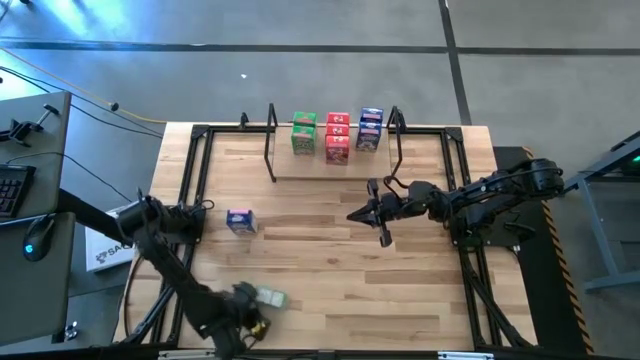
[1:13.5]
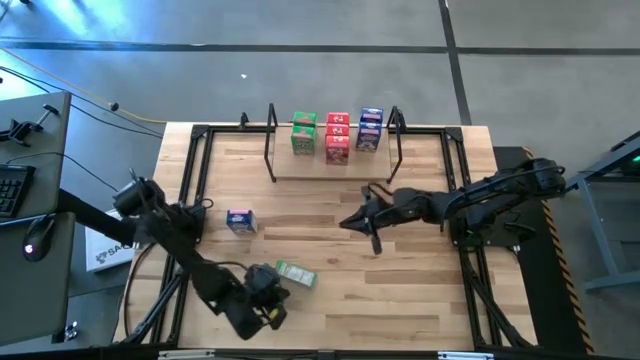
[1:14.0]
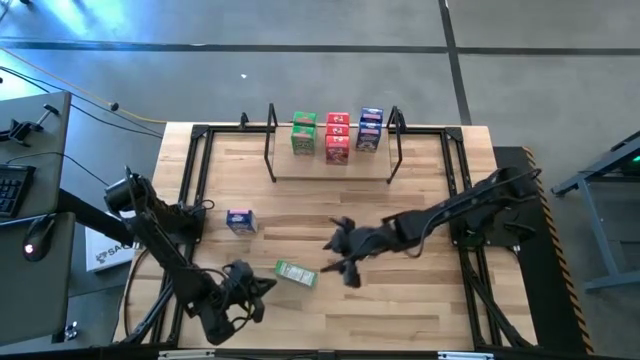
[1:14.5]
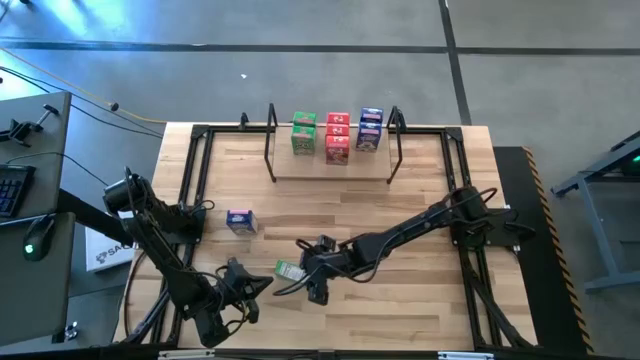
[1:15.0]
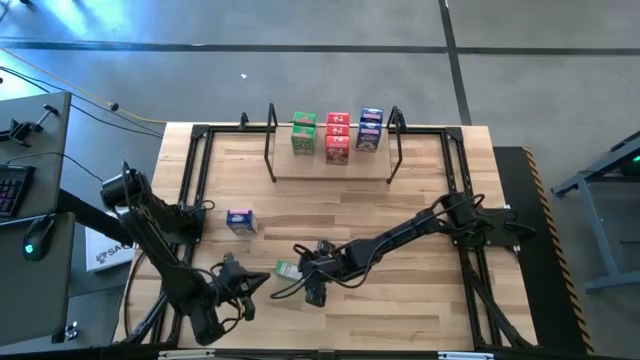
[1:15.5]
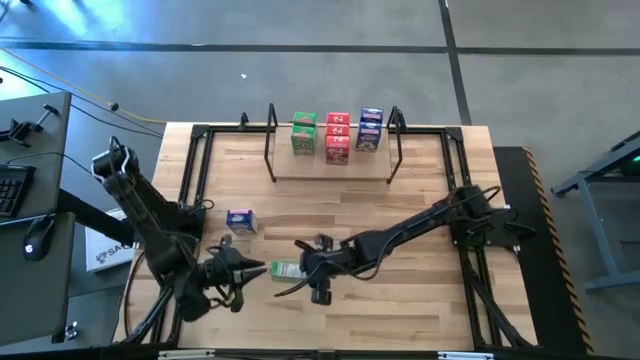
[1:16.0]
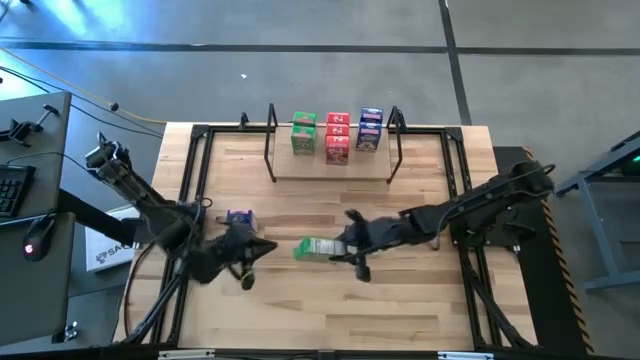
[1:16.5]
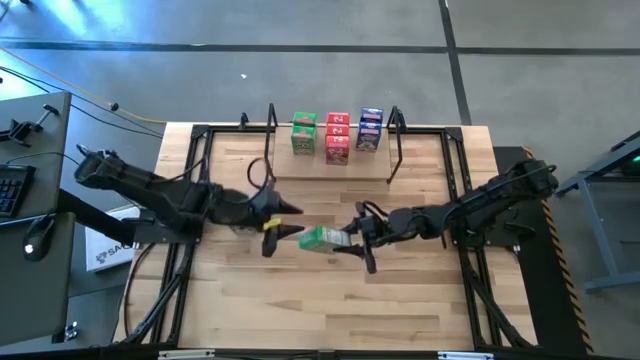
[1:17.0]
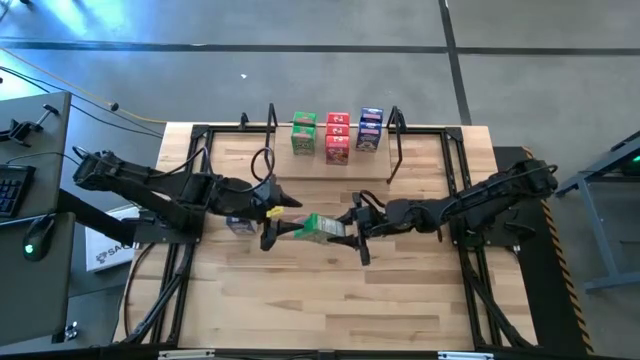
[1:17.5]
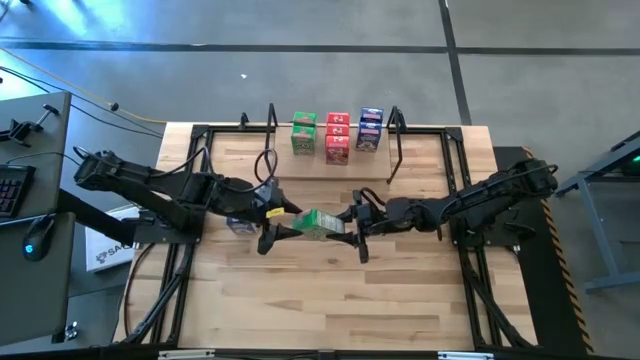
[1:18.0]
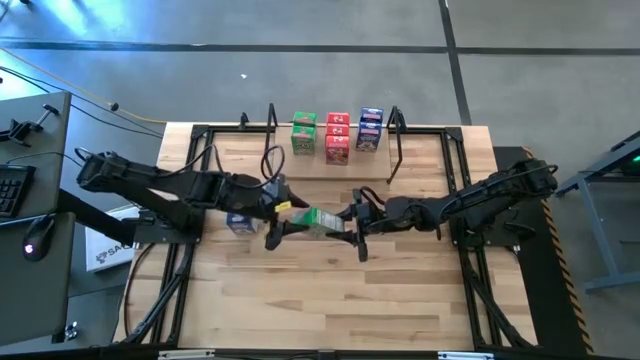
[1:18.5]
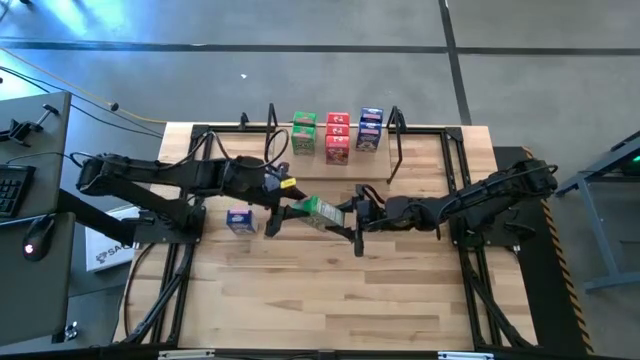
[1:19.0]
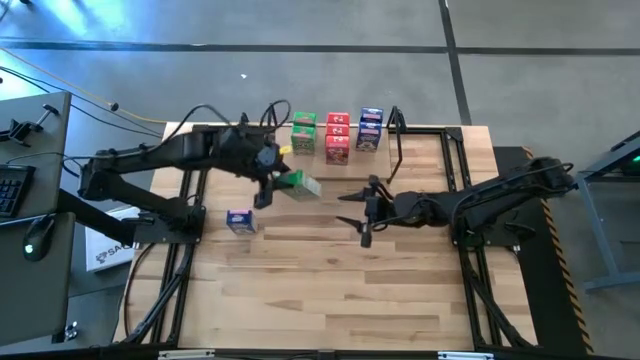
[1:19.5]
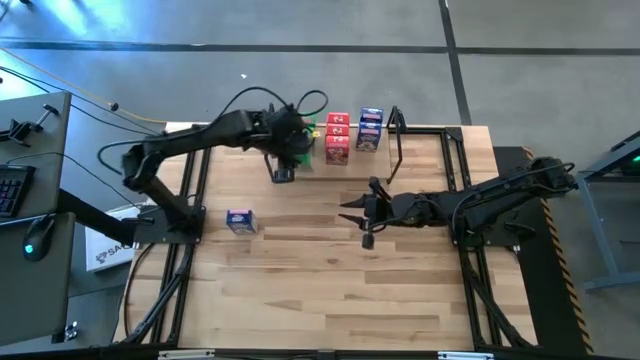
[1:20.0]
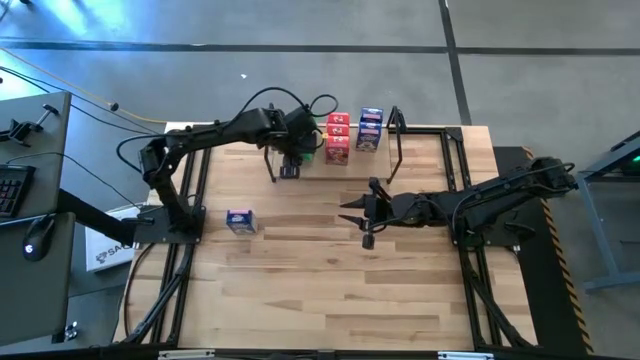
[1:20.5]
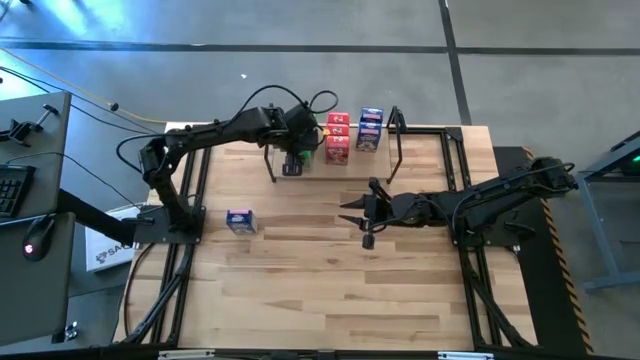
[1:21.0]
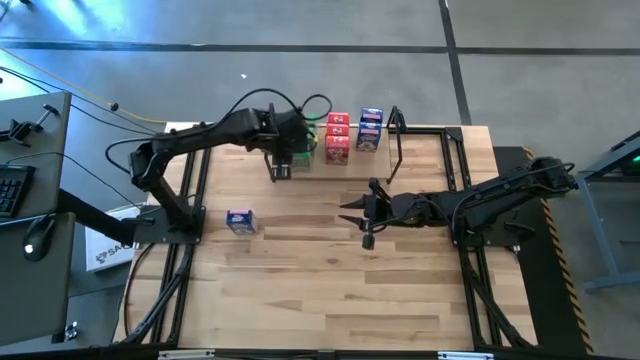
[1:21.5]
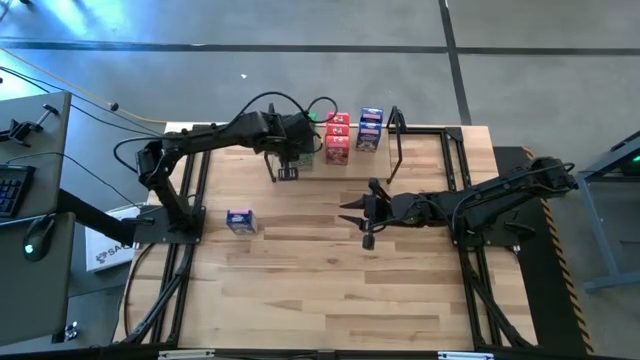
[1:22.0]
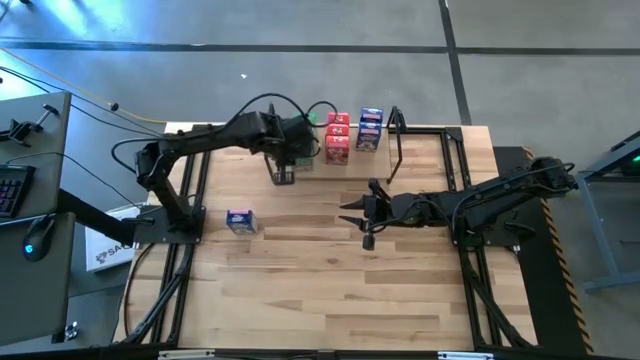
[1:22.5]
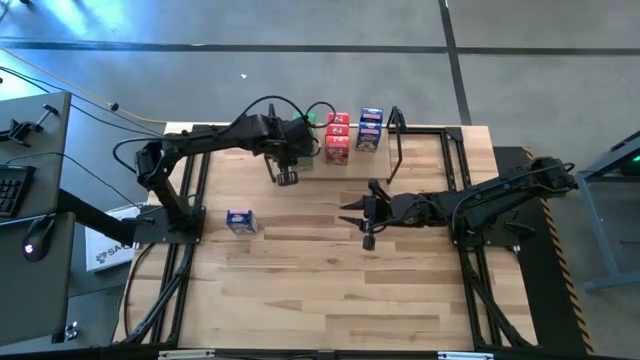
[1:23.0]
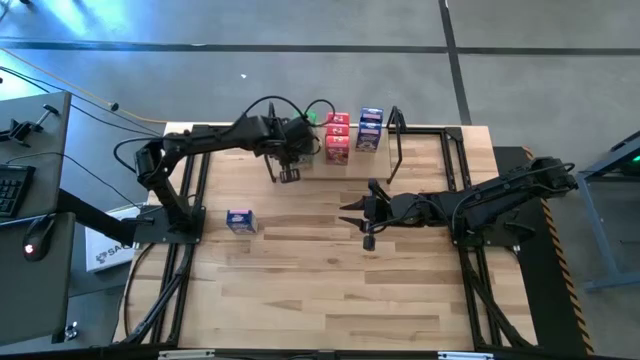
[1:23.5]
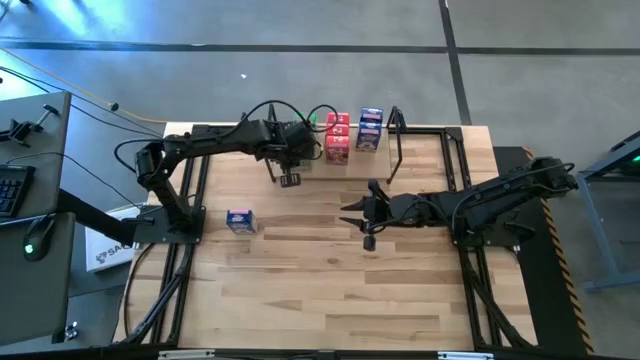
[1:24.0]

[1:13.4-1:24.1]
Task: Stack cereal on shelf
Put the green cereal box on the shelf aligned with the other green cereal boxes

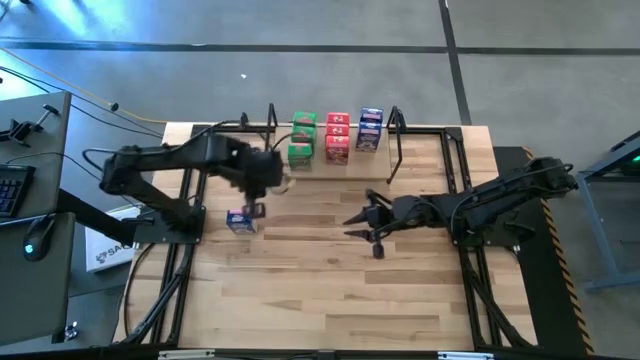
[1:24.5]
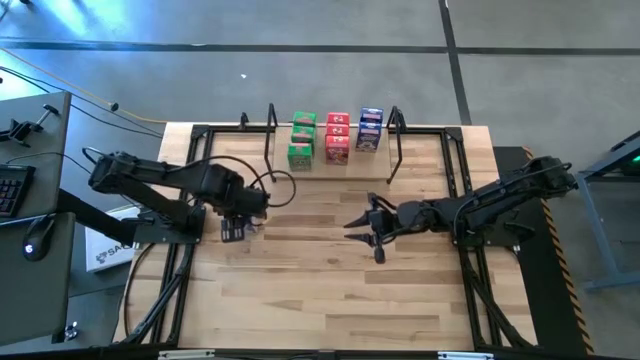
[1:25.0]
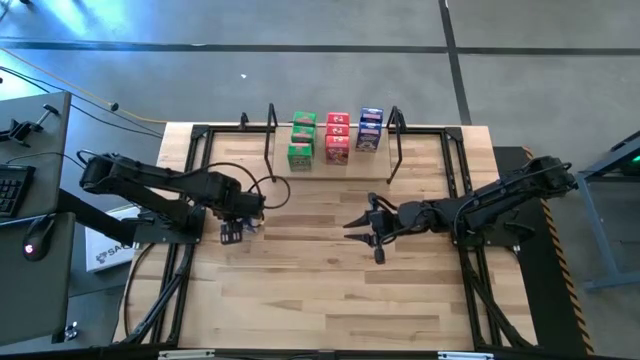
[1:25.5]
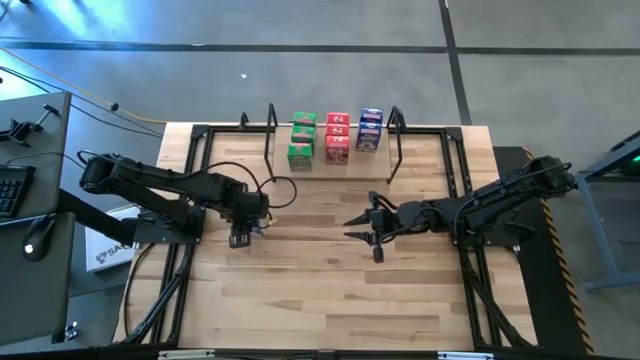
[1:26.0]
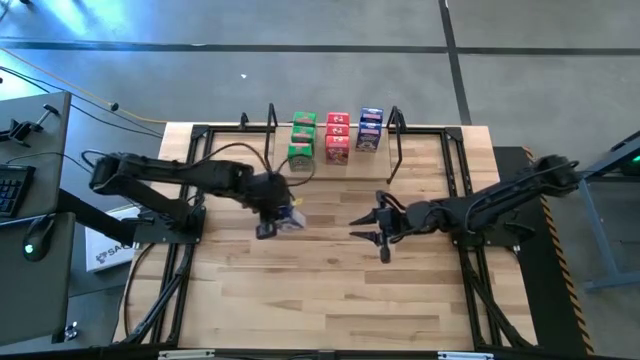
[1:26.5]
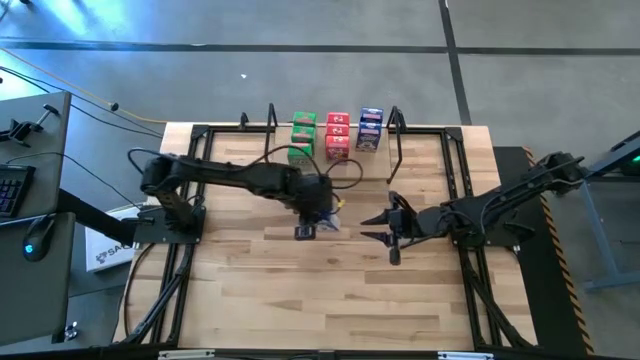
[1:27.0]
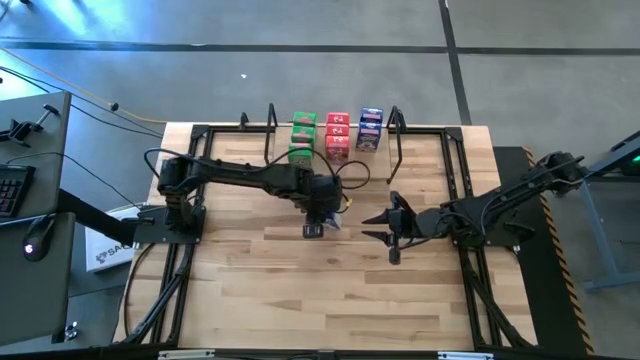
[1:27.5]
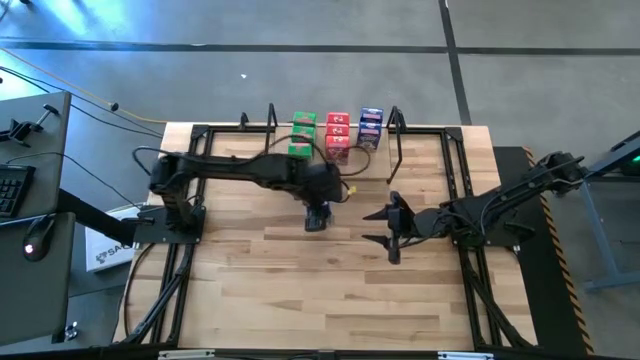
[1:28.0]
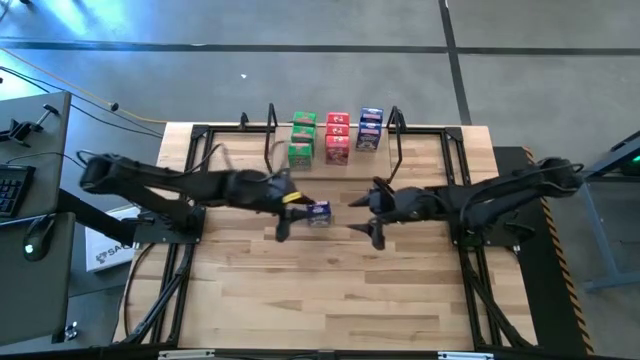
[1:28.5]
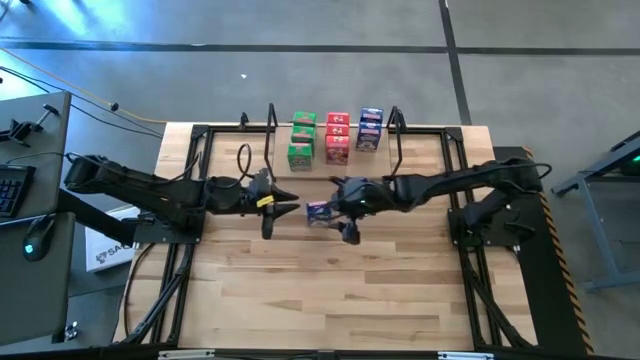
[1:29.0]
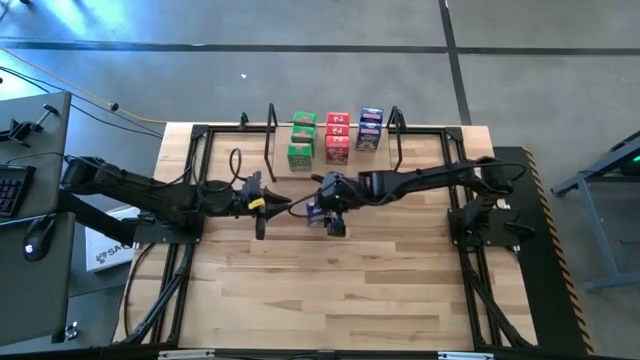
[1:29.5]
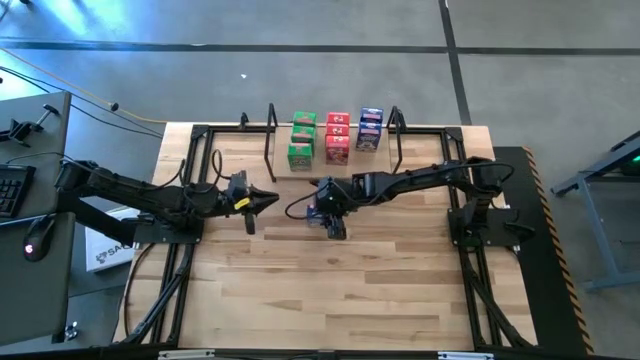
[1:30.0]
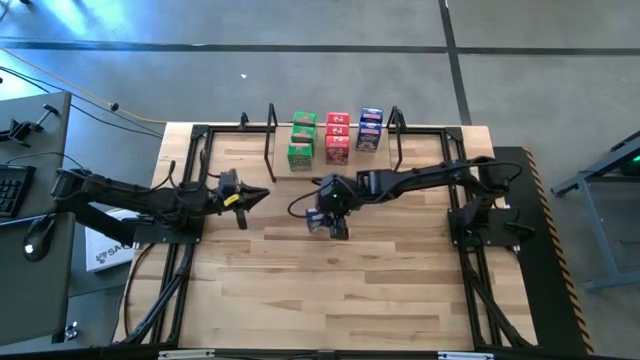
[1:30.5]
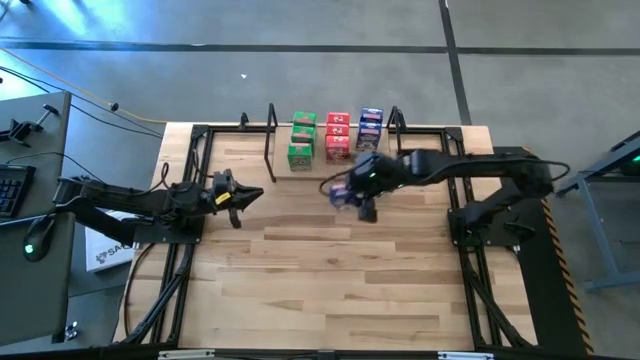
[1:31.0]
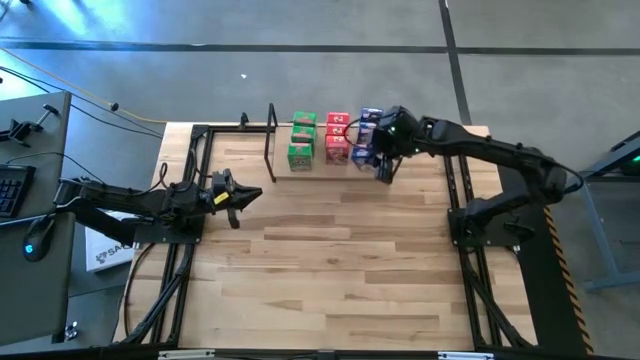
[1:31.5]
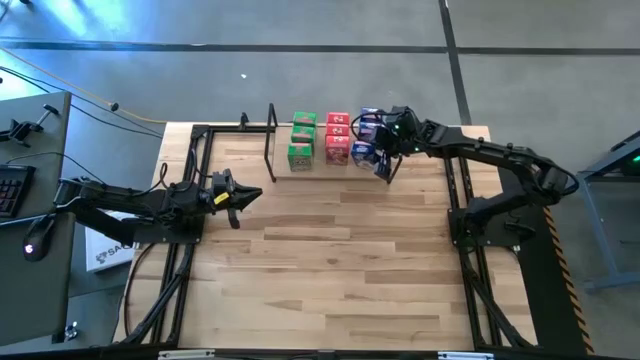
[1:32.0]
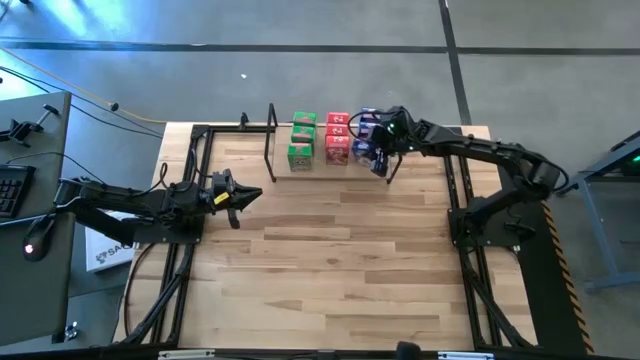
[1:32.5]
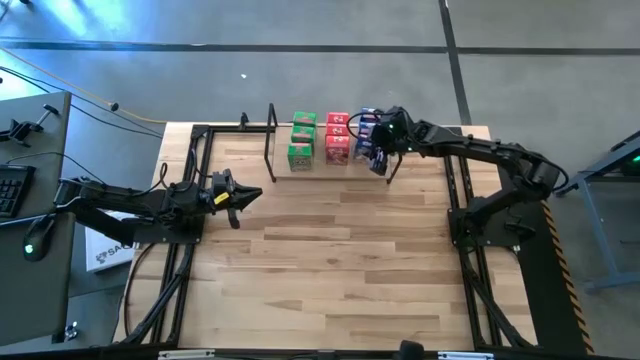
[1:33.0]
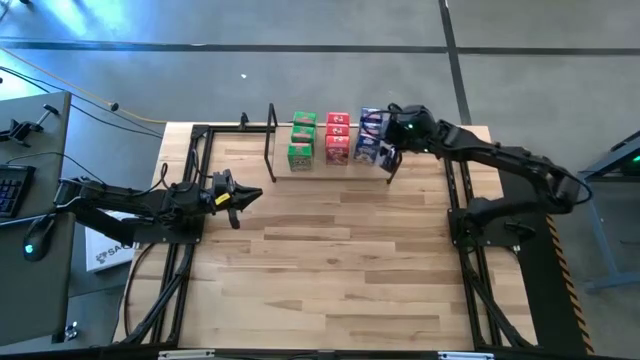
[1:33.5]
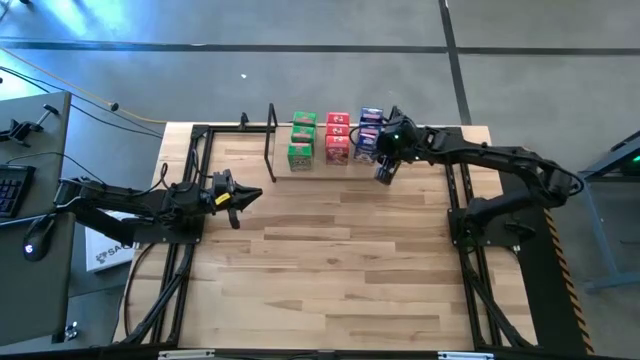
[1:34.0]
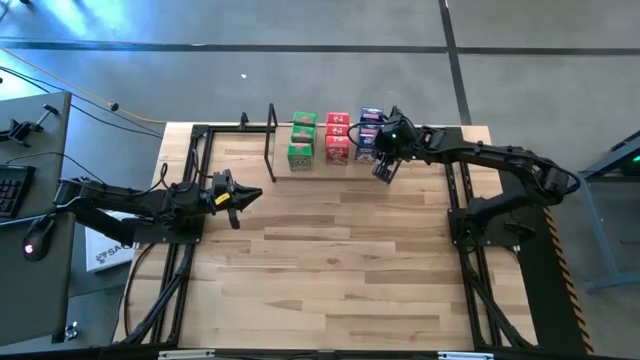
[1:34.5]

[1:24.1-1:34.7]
Put the blue cereal box on the shelf aligned with the other blue cereal boxes
